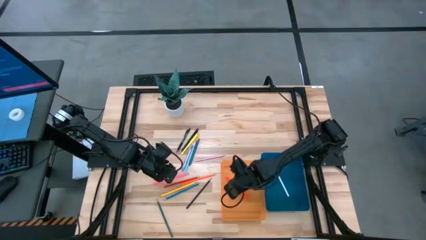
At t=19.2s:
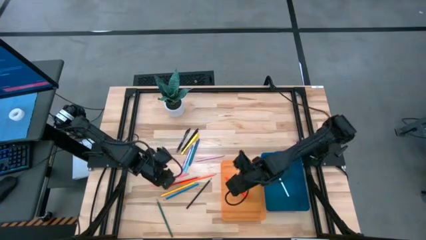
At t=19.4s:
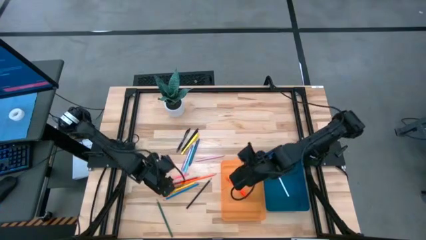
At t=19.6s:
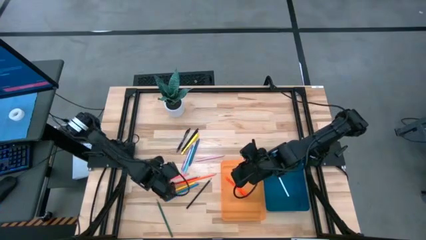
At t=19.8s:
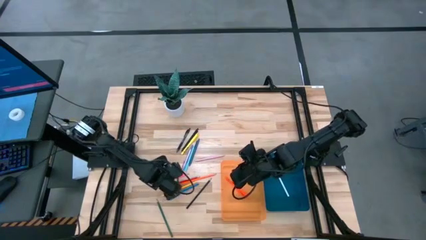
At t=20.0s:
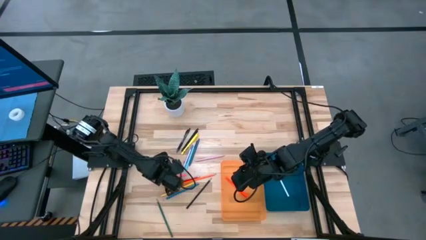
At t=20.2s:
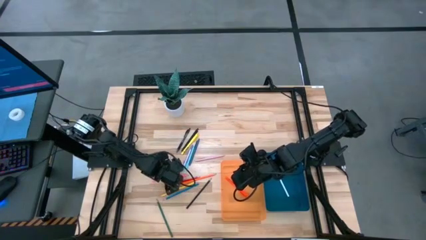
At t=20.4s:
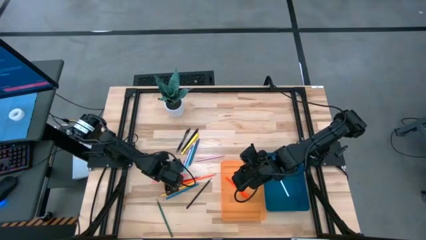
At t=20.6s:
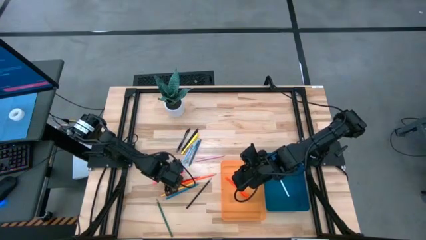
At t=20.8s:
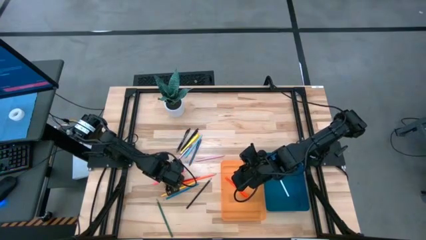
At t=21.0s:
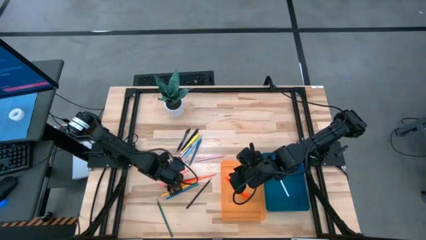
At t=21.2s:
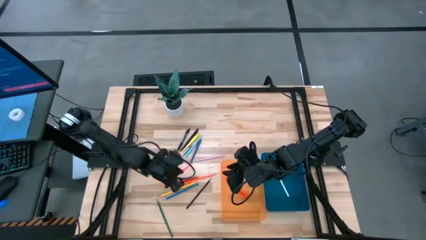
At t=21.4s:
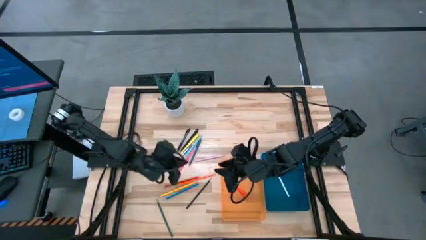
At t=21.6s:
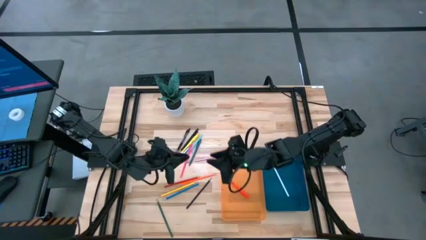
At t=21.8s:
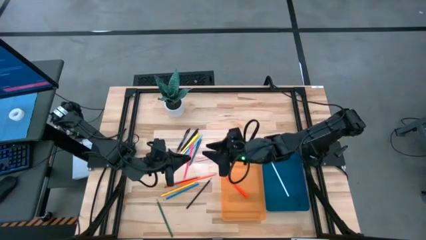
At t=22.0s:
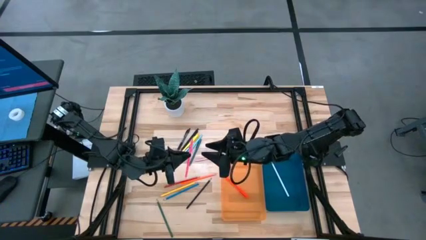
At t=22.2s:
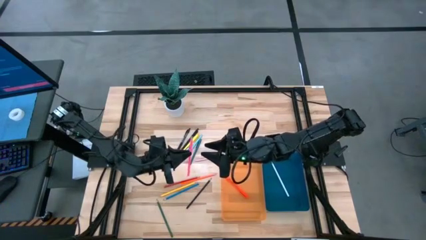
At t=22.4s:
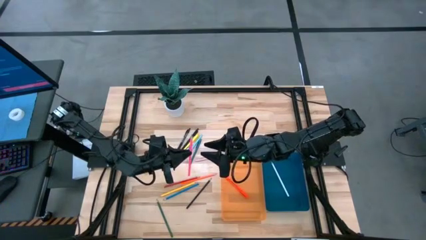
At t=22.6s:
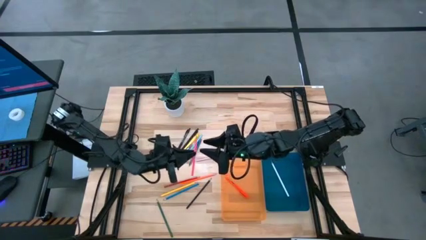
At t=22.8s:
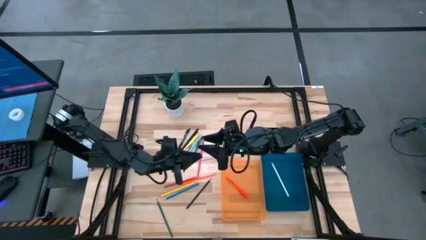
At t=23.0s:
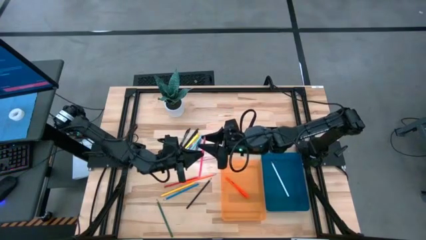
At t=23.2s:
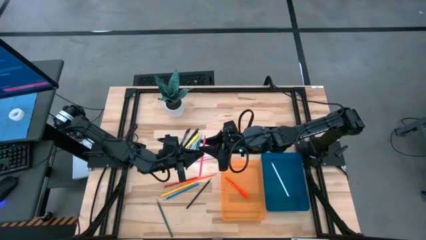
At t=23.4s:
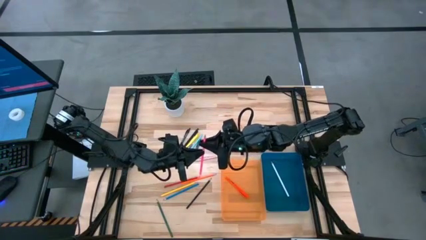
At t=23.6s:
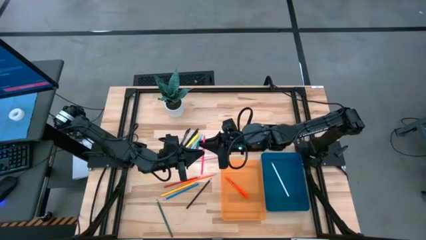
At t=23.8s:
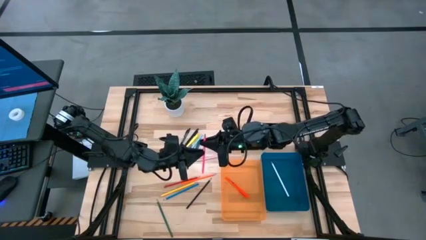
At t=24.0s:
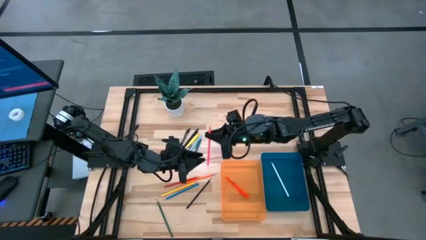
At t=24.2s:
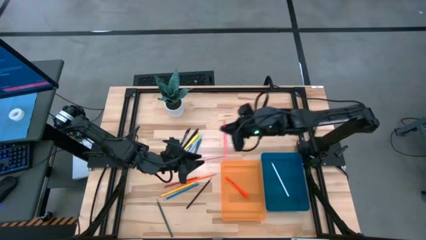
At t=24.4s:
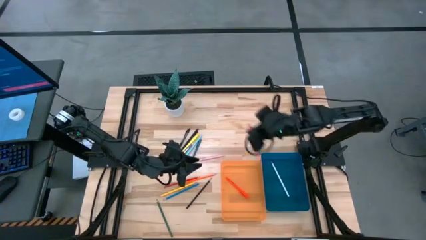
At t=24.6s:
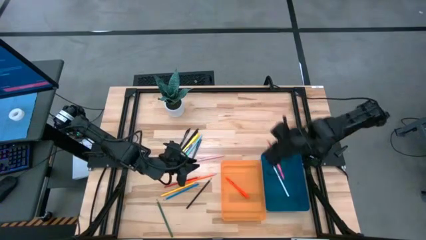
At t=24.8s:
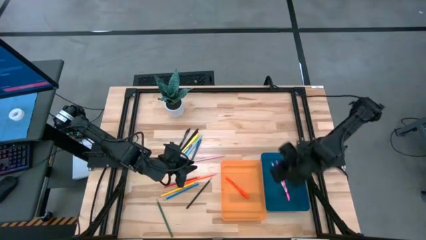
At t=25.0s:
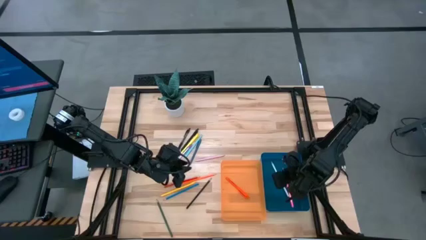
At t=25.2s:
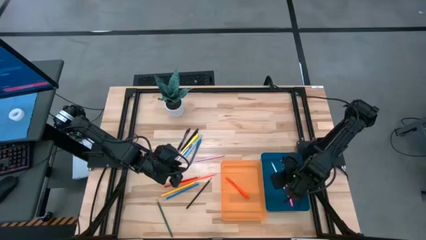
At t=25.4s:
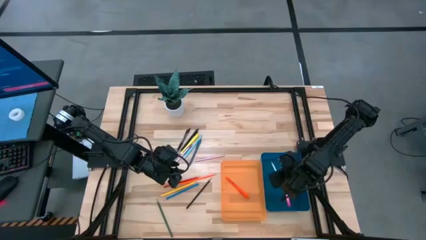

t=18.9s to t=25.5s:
Task: Sort pens & pencils
Put the pink pencil into the blue bin

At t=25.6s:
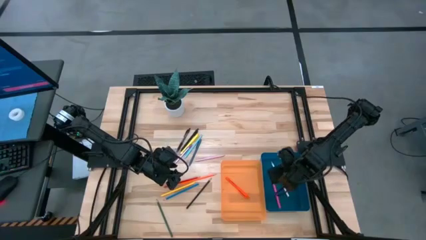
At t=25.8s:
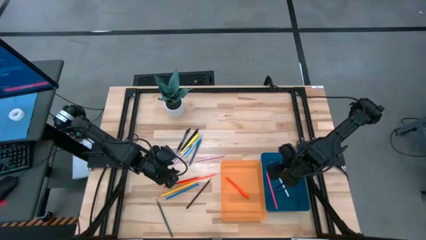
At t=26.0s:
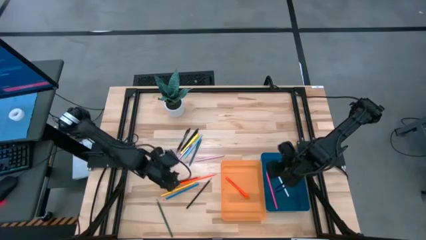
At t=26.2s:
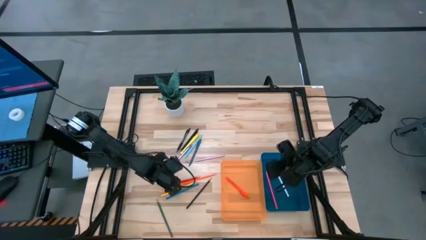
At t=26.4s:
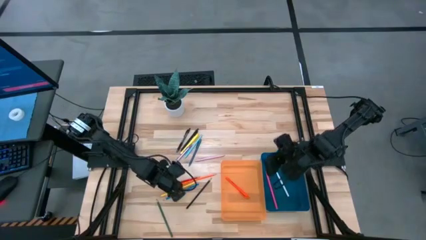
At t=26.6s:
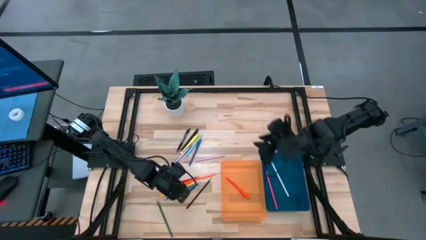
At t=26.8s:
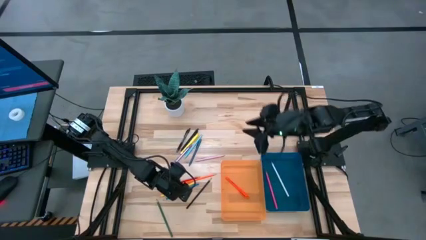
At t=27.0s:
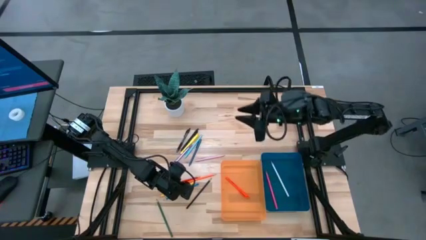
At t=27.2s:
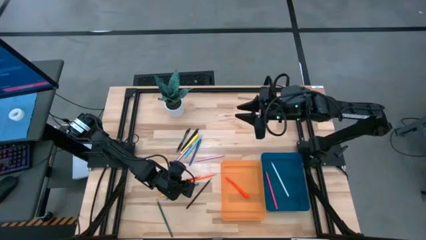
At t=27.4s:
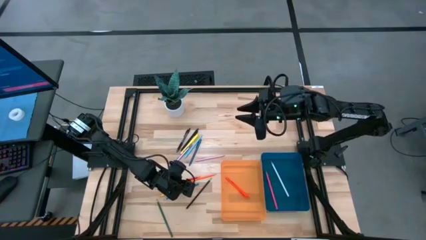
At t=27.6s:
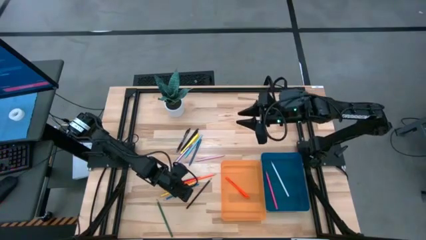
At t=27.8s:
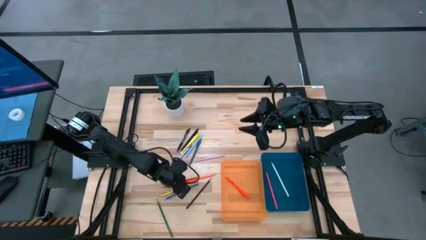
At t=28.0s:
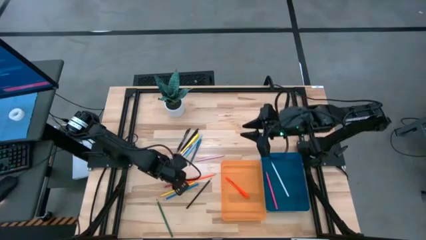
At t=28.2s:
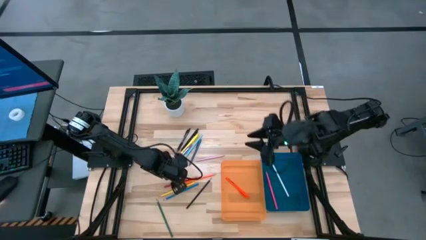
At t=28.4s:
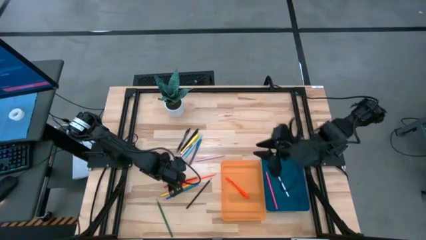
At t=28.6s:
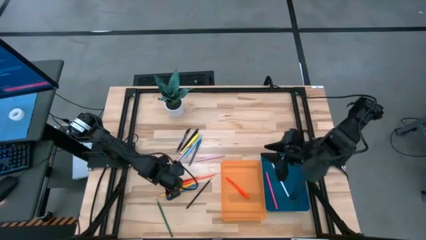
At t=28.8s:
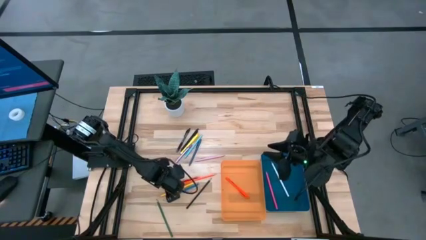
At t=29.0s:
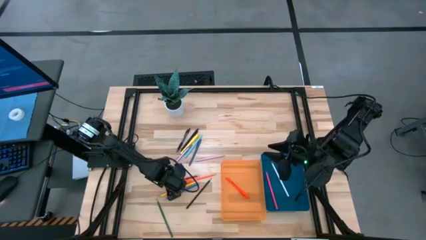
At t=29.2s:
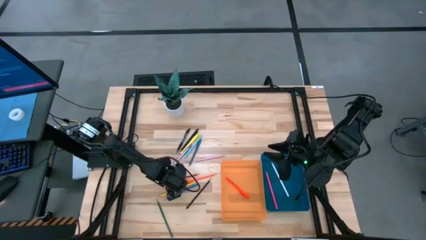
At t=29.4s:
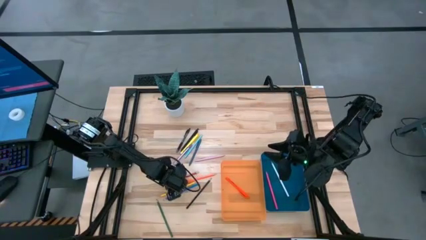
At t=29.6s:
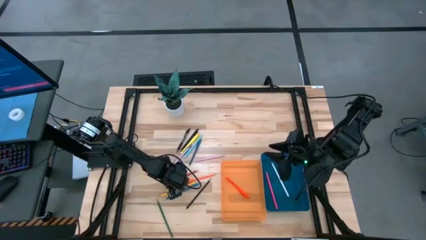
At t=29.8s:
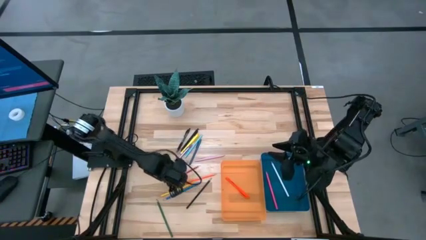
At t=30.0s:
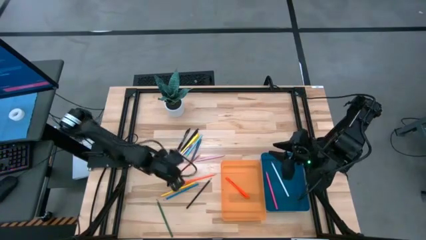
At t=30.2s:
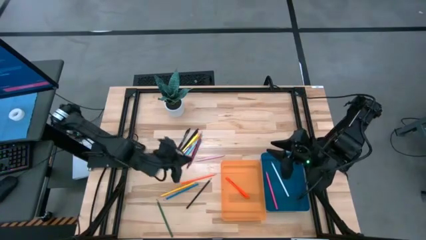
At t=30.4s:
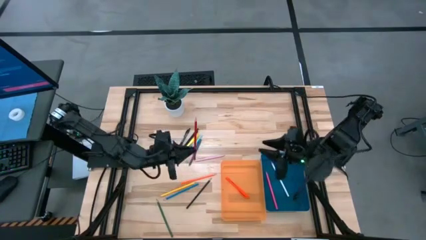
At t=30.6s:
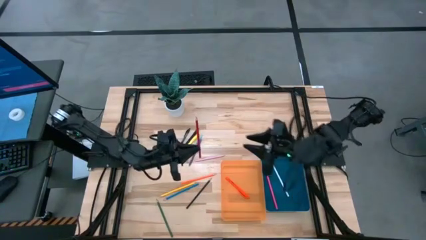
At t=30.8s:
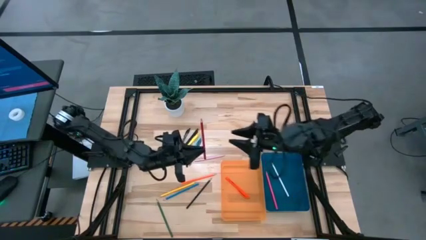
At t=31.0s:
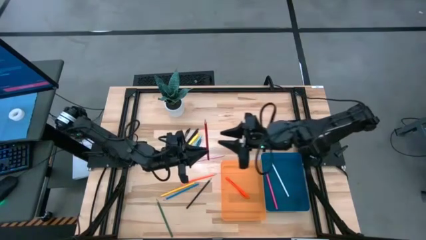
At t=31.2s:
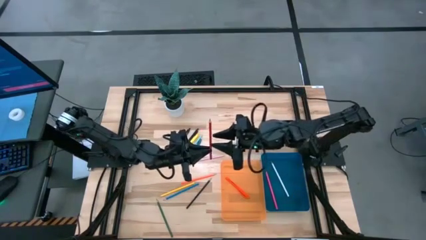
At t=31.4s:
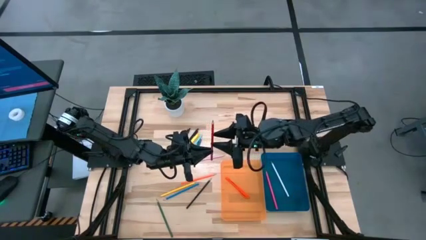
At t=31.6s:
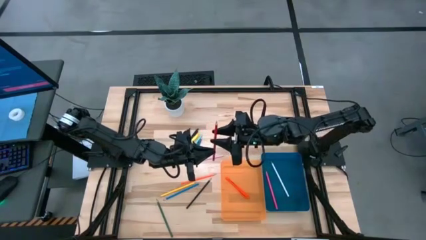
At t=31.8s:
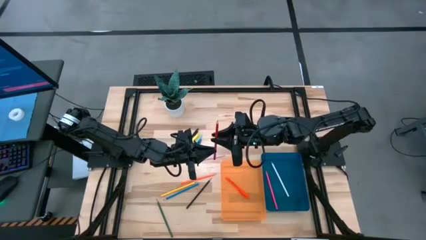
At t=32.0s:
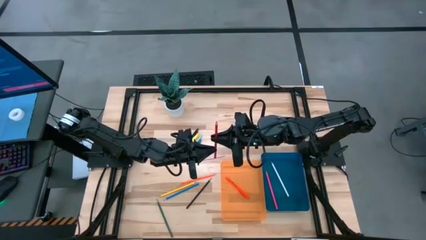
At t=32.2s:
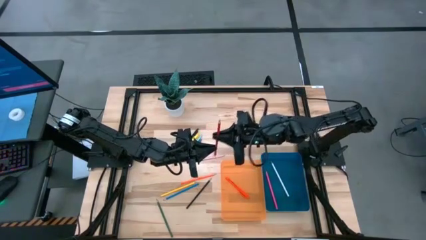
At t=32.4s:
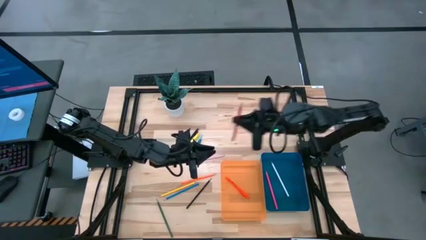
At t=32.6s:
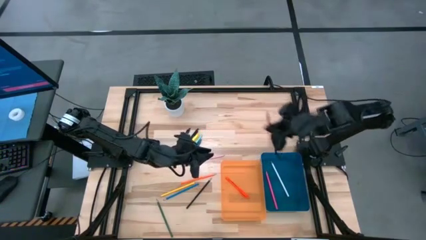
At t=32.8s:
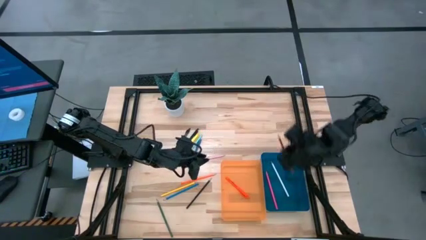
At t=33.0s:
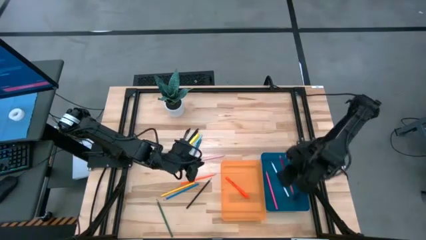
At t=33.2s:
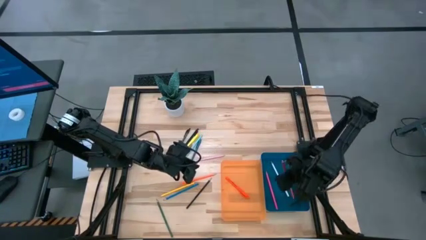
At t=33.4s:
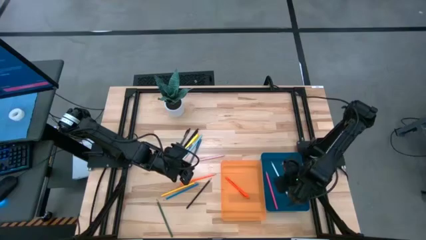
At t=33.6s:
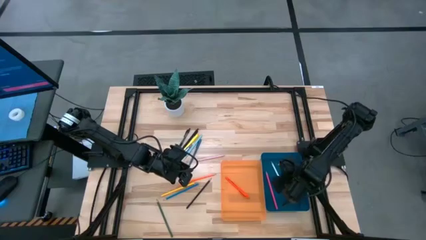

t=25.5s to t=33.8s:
Put the red pencil into the blue bin
